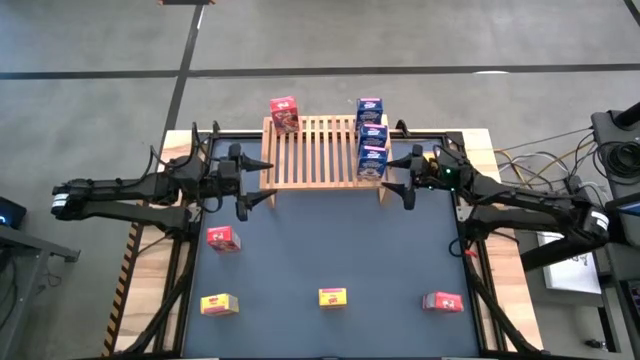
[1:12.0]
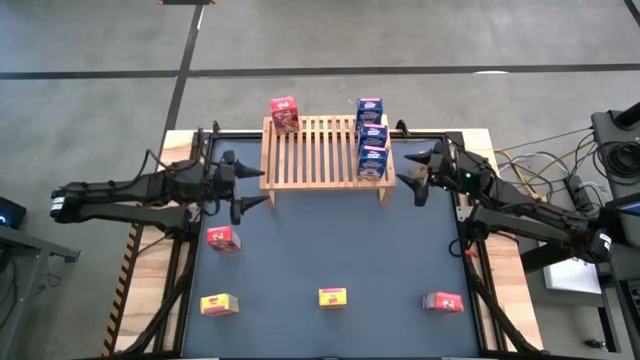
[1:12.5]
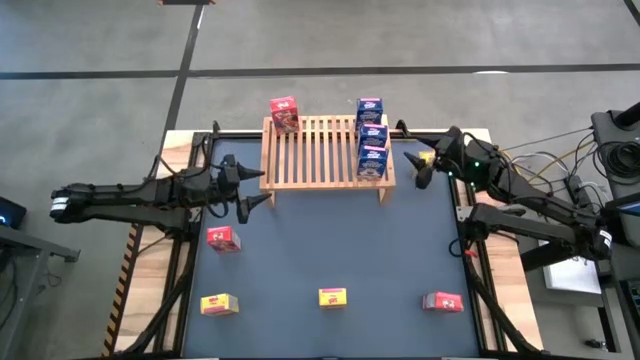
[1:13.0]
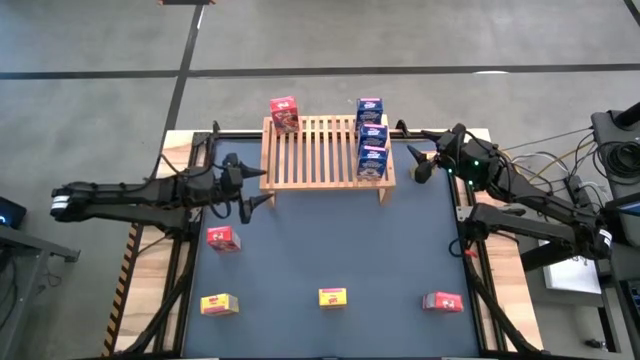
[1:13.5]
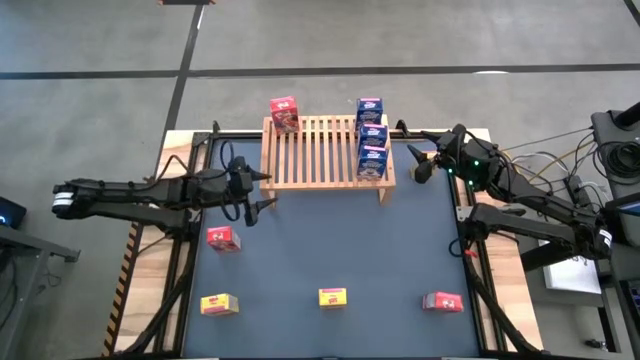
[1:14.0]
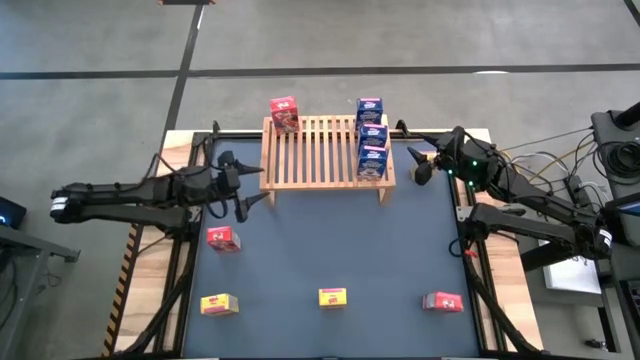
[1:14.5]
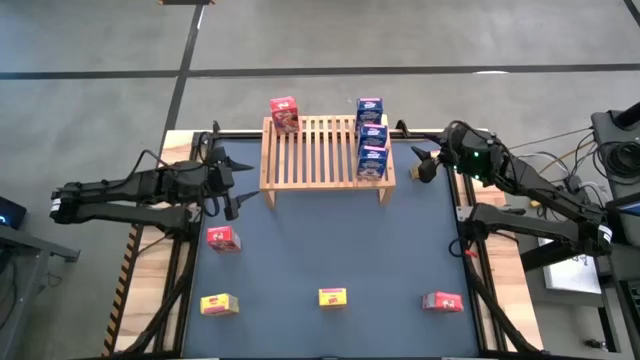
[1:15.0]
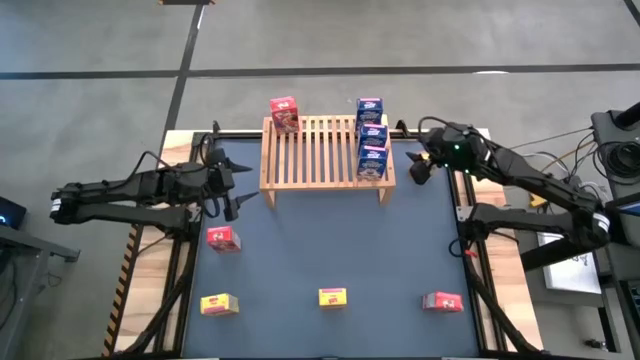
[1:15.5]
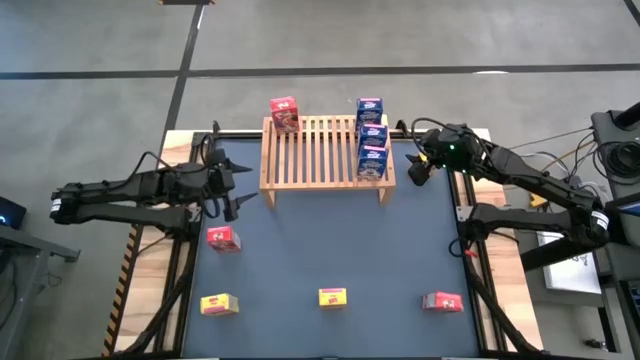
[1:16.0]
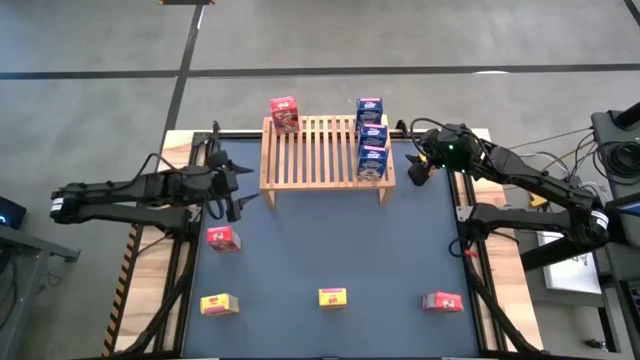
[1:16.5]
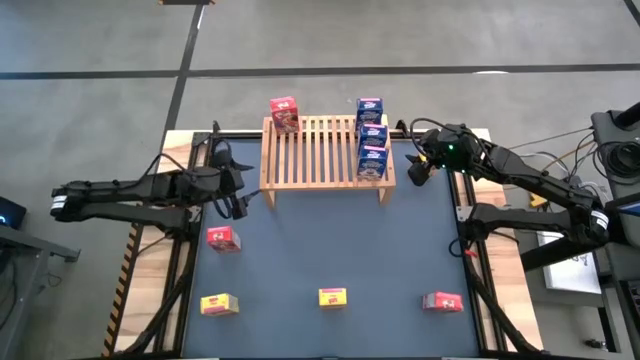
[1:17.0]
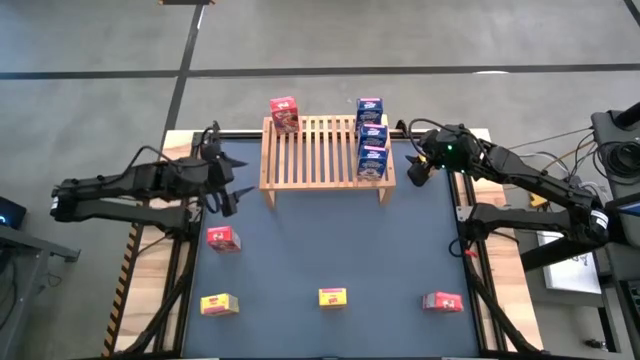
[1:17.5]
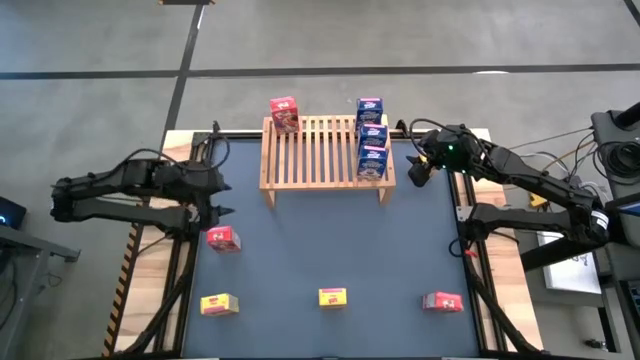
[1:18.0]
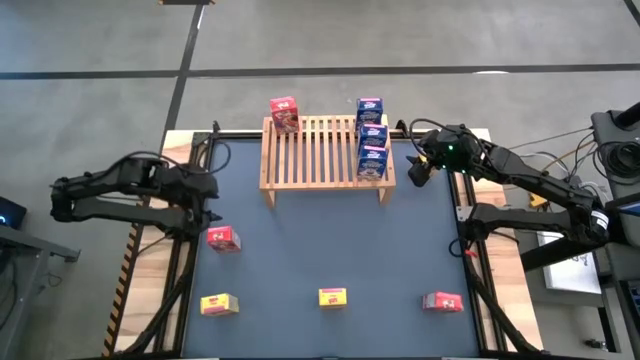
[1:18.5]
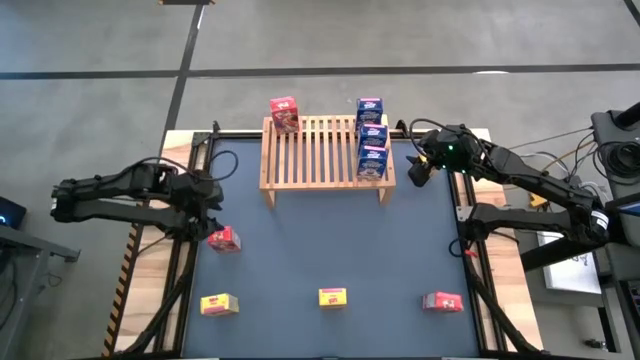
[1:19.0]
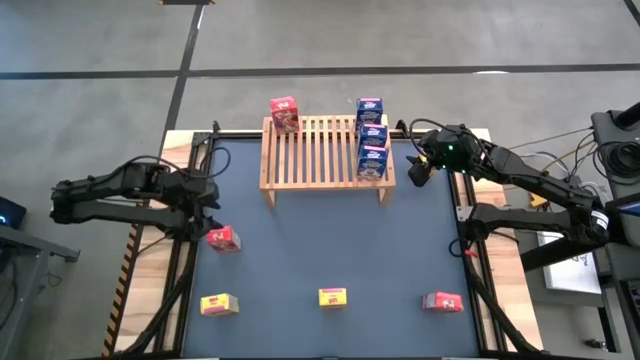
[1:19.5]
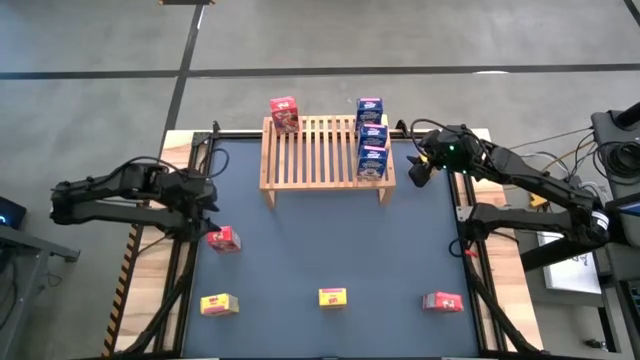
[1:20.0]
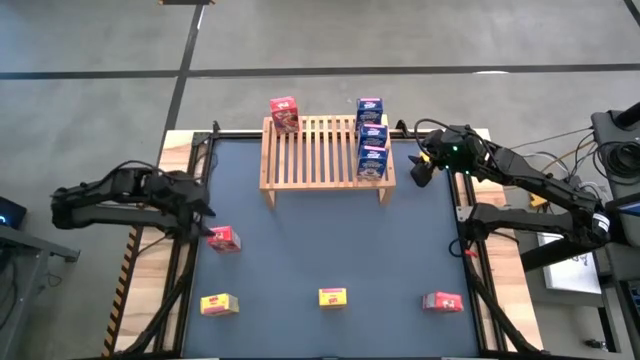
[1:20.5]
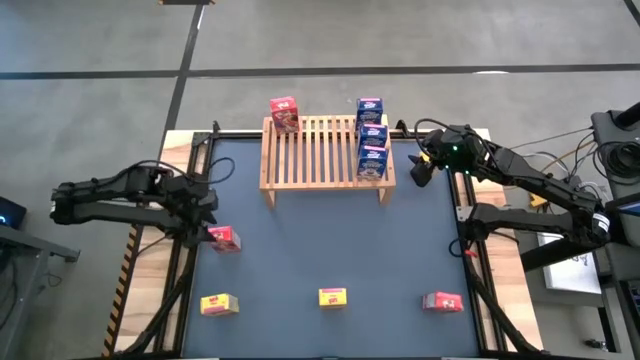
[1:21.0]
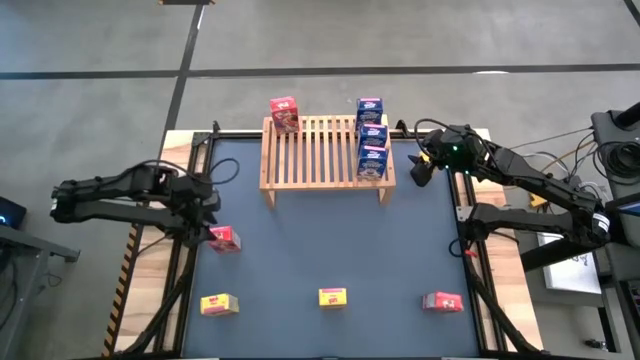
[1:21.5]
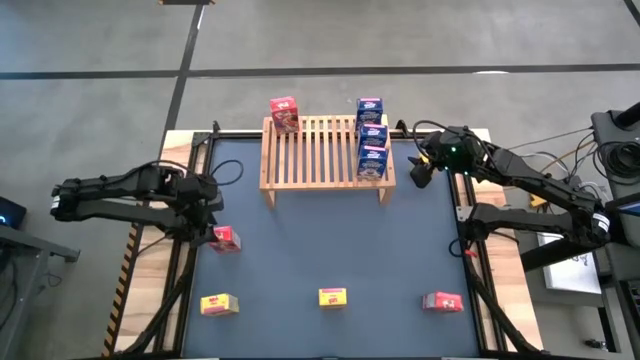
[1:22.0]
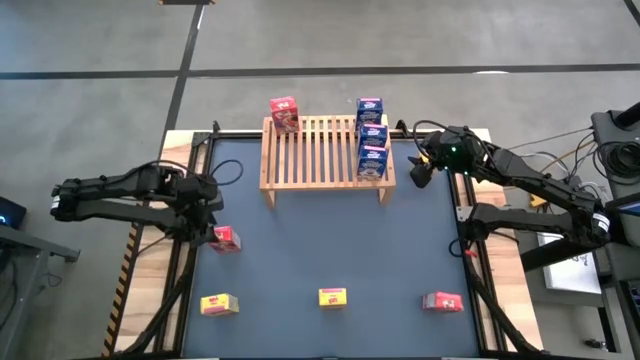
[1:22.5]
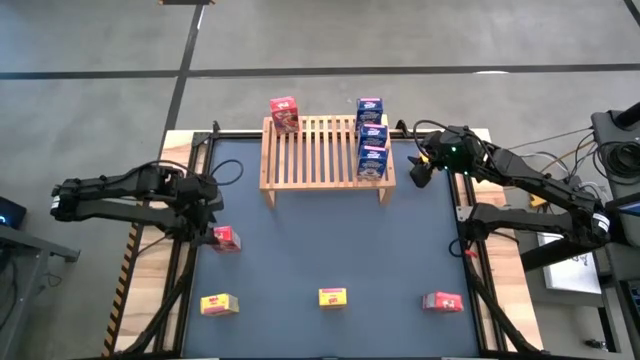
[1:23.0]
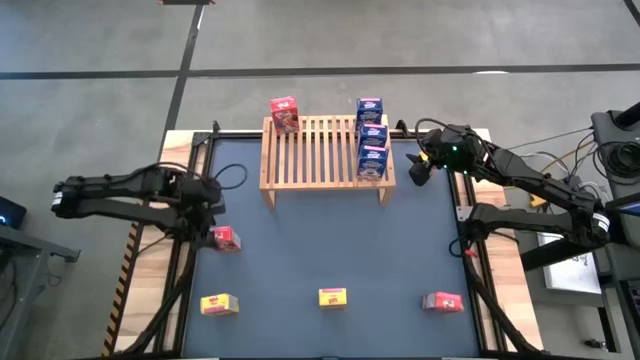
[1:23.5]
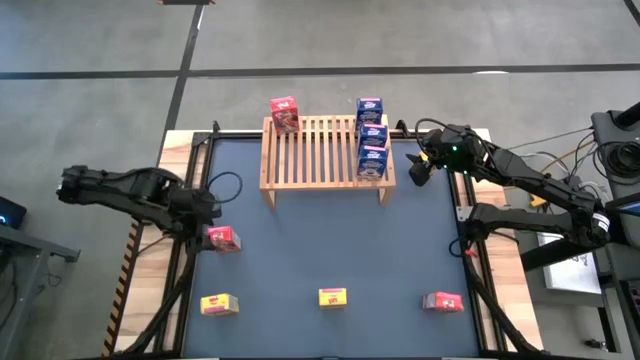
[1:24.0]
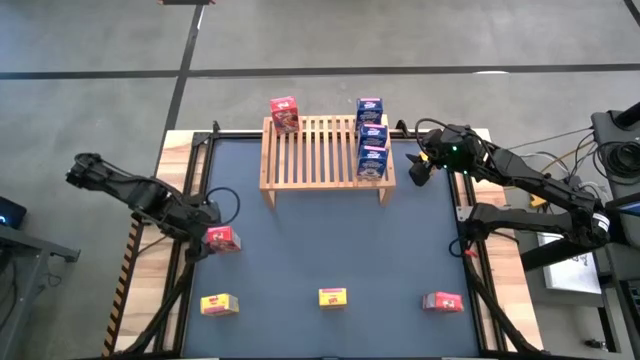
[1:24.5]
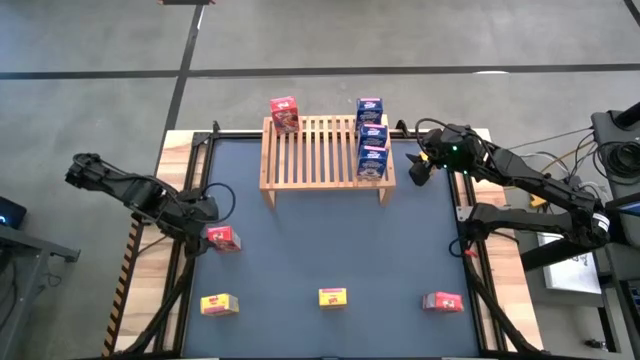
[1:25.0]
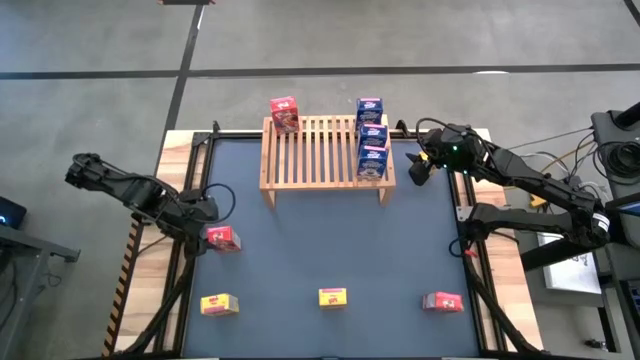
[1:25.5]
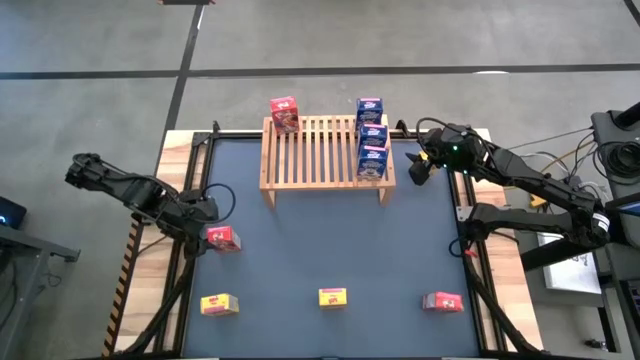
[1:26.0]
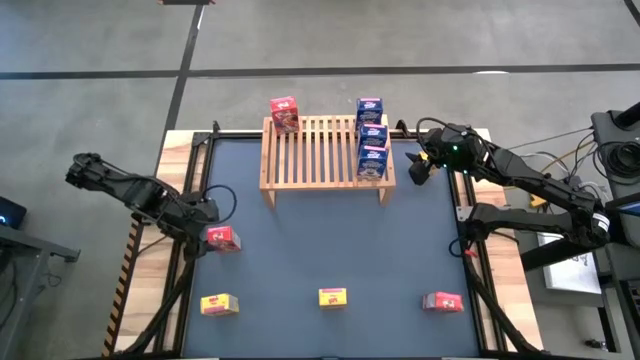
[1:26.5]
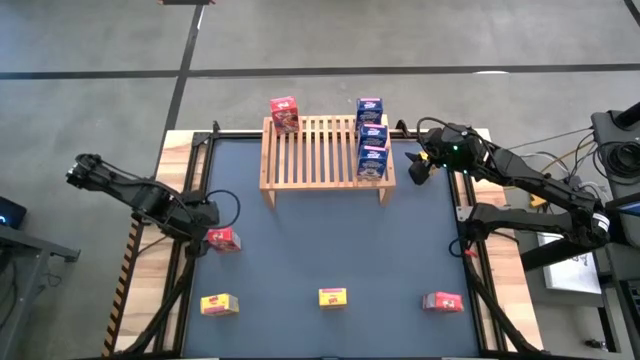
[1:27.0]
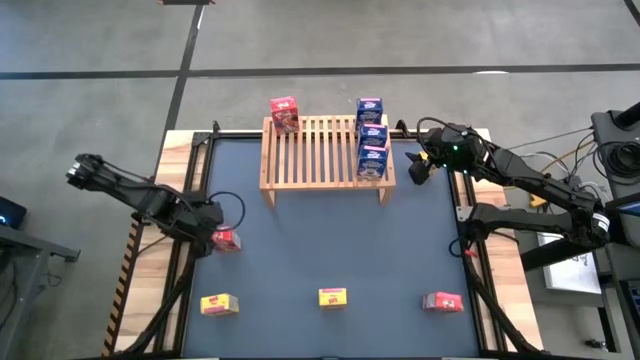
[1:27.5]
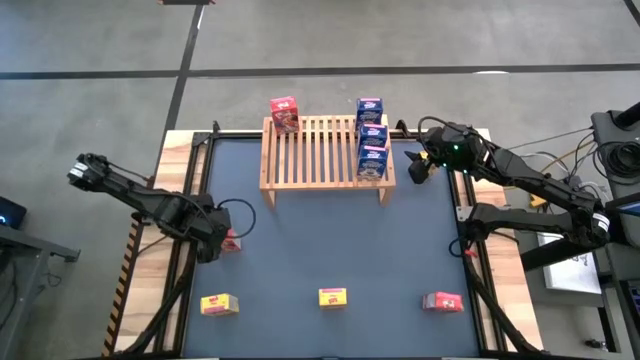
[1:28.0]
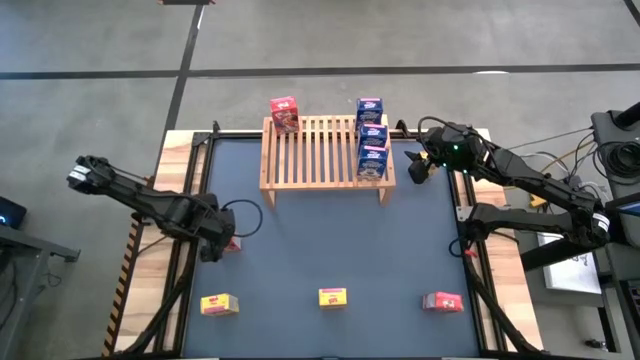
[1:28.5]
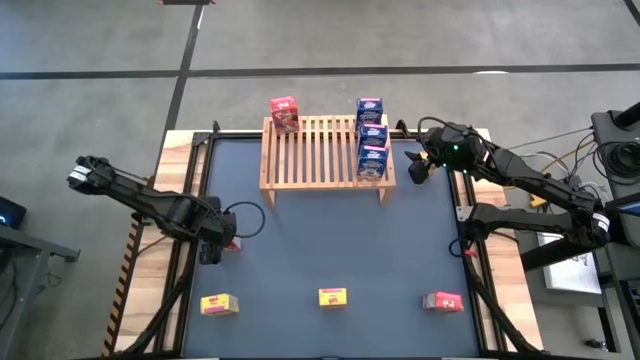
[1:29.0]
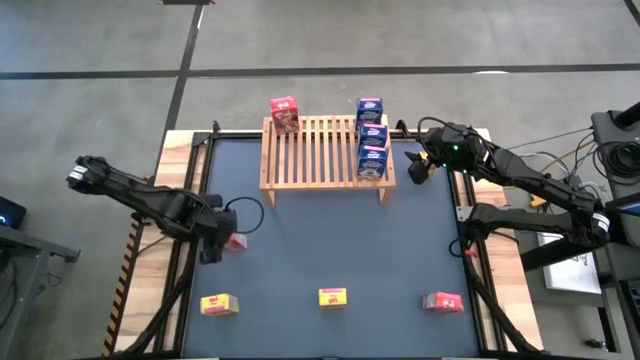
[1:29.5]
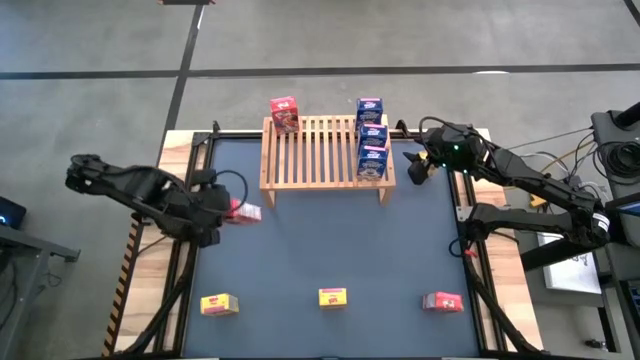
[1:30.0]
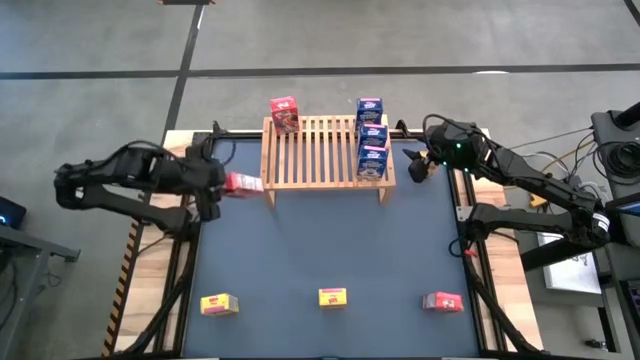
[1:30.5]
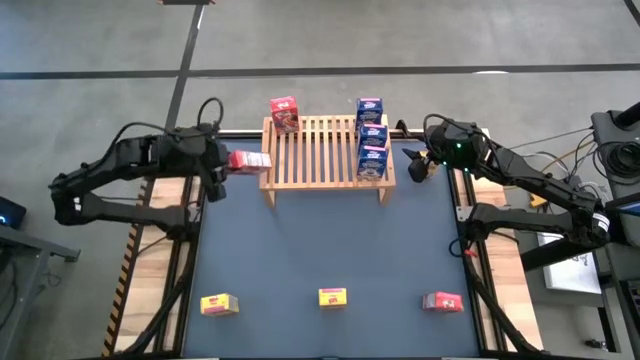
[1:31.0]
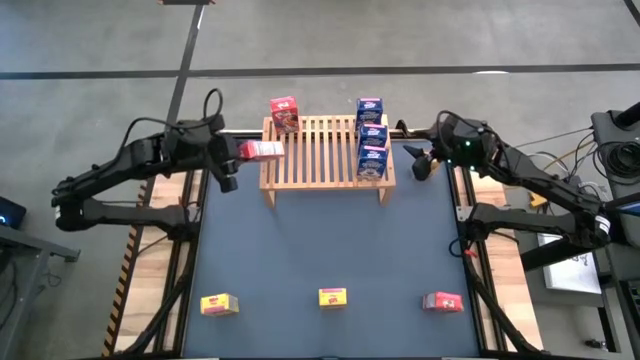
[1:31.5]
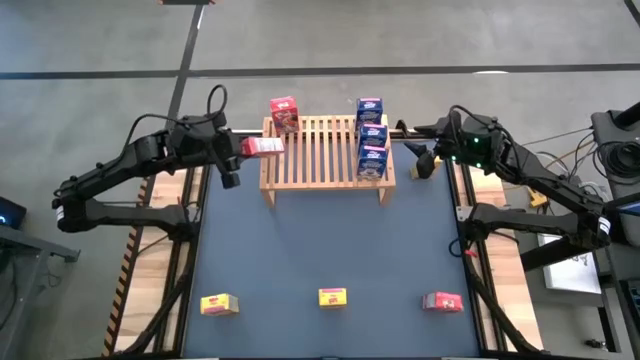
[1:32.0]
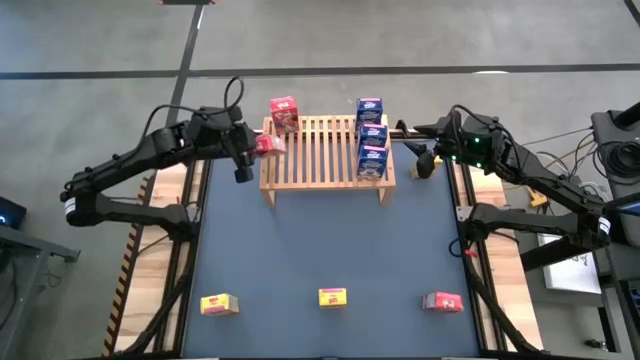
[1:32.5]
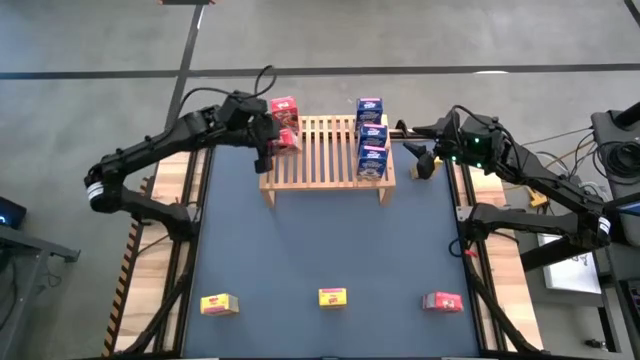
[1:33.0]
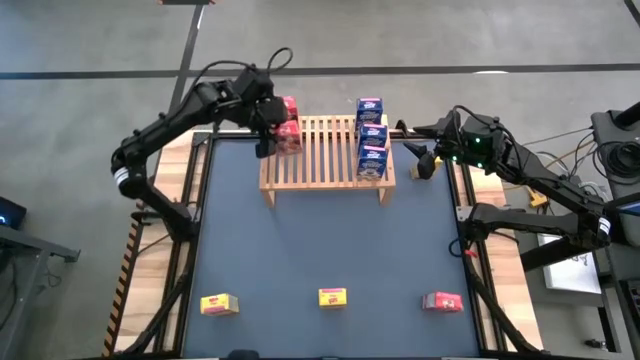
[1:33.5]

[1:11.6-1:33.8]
Task: Stack cereal on shelf
Put the top red cereal box on the shelf aligned with the red cereal box
